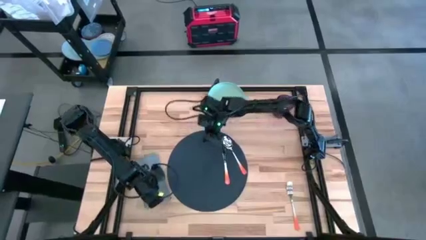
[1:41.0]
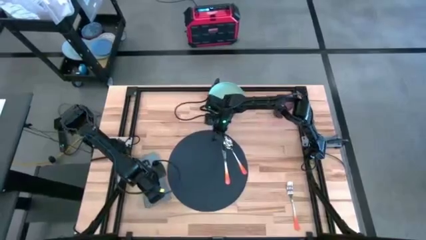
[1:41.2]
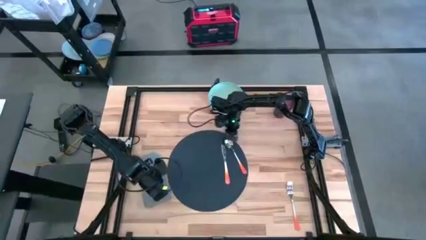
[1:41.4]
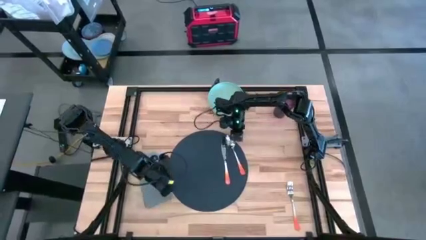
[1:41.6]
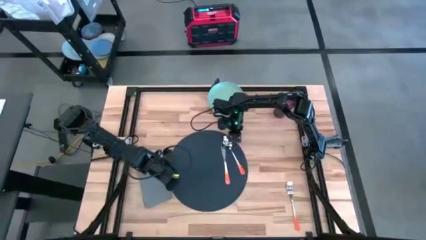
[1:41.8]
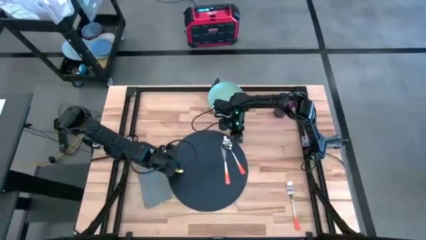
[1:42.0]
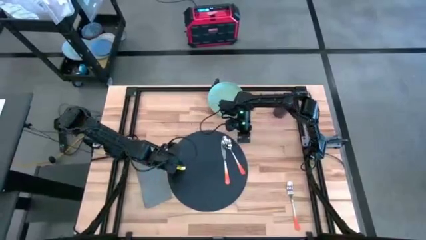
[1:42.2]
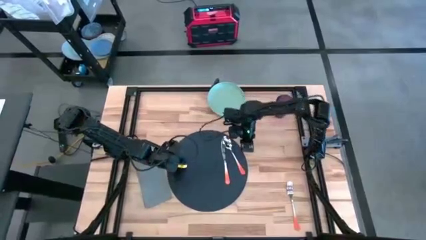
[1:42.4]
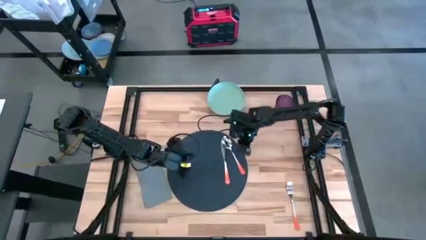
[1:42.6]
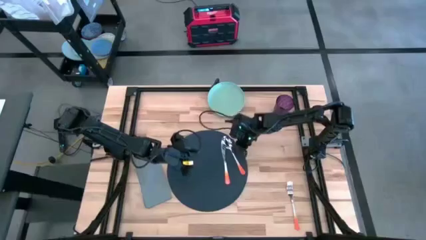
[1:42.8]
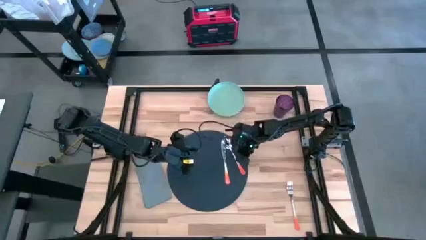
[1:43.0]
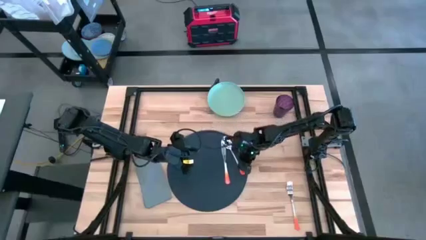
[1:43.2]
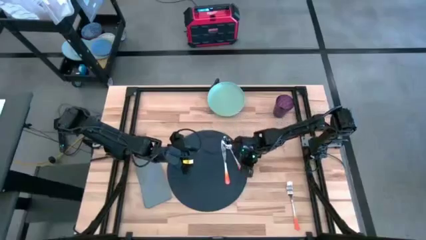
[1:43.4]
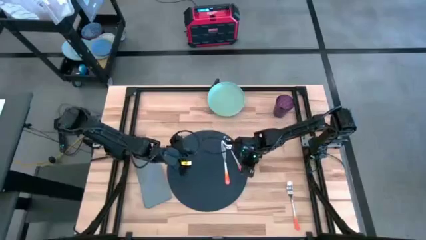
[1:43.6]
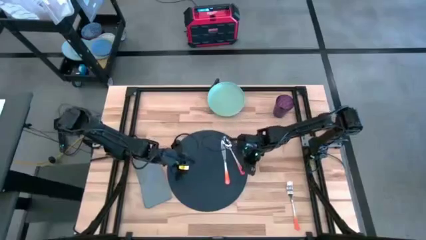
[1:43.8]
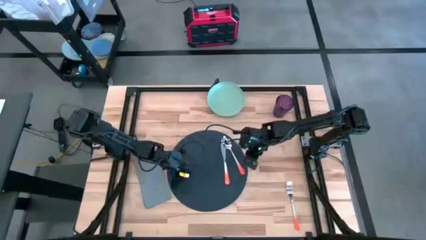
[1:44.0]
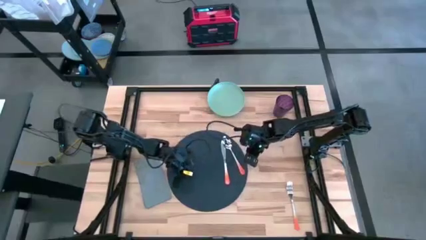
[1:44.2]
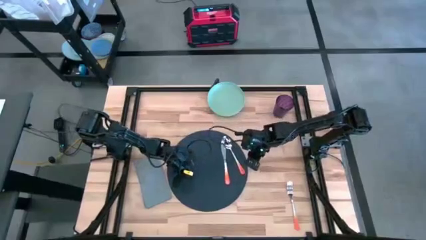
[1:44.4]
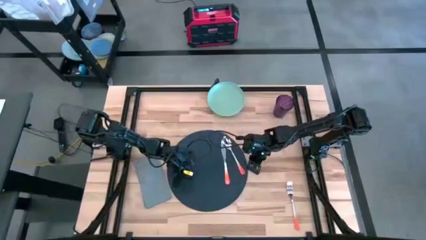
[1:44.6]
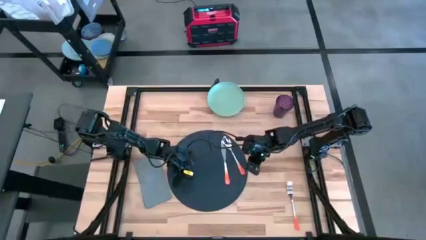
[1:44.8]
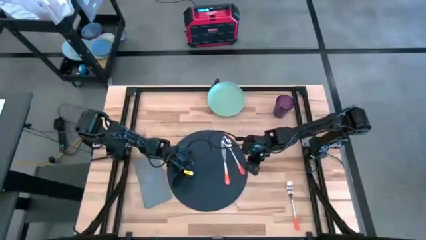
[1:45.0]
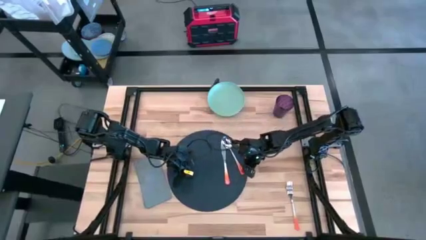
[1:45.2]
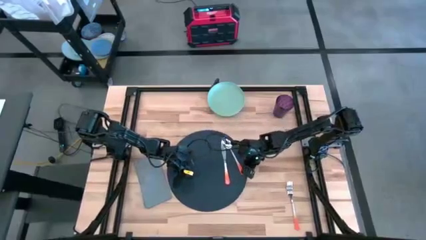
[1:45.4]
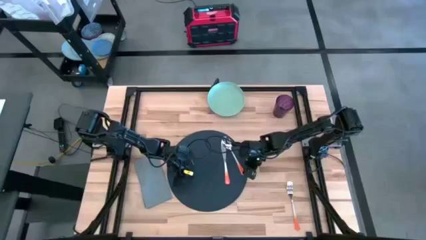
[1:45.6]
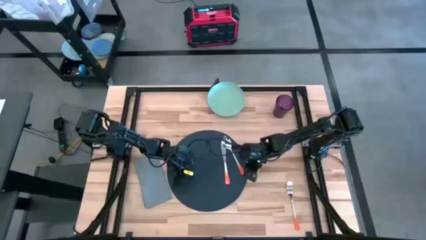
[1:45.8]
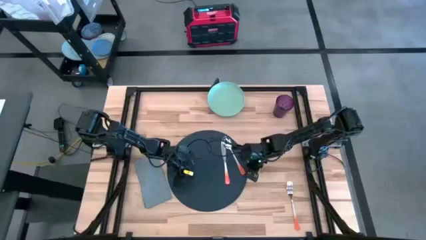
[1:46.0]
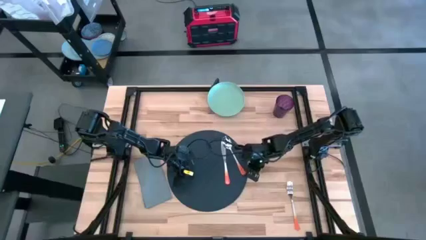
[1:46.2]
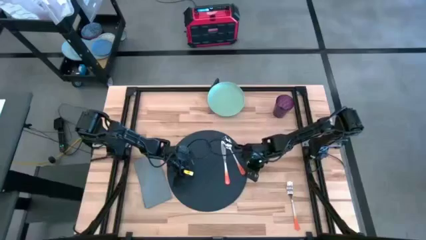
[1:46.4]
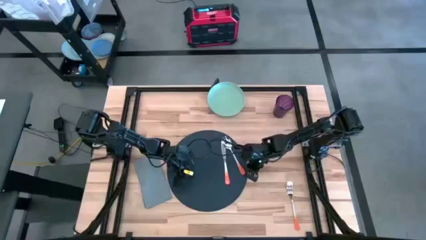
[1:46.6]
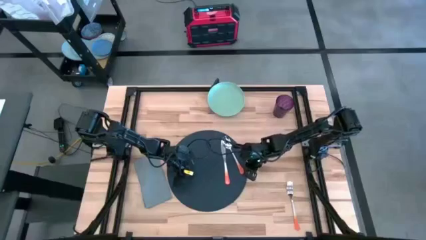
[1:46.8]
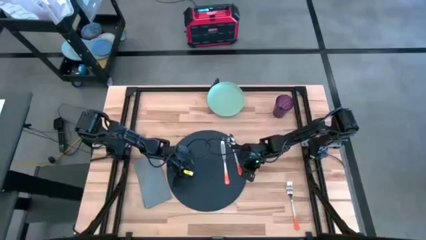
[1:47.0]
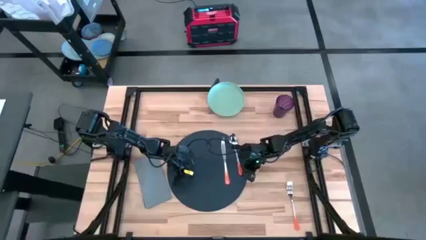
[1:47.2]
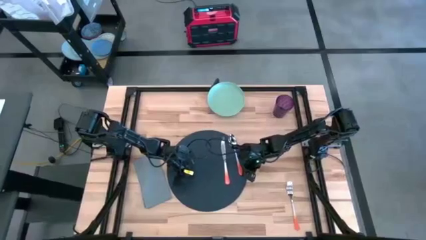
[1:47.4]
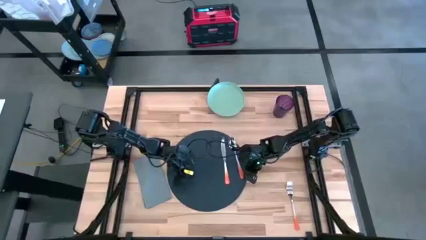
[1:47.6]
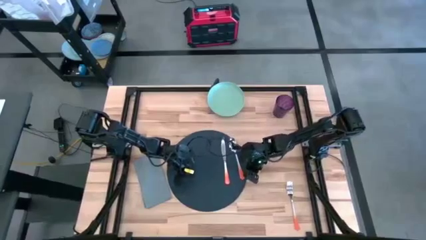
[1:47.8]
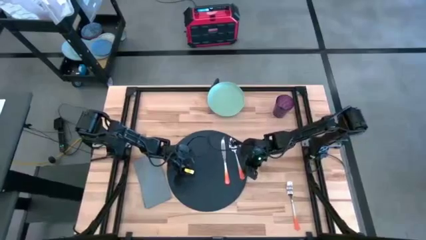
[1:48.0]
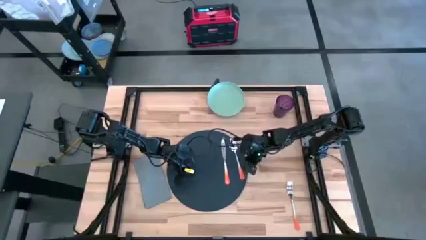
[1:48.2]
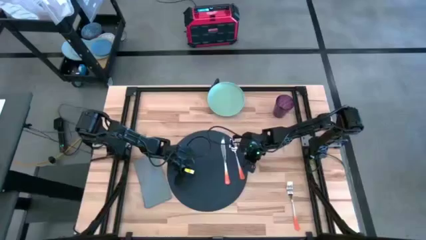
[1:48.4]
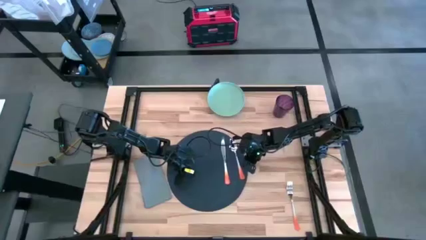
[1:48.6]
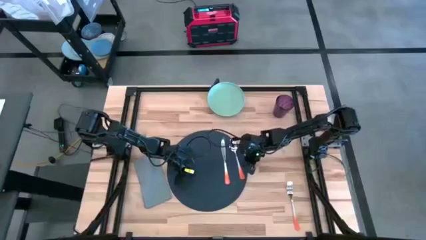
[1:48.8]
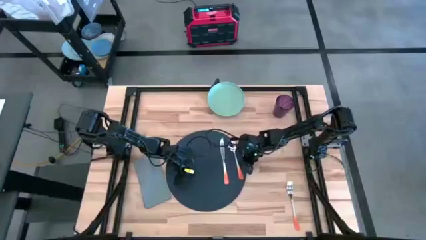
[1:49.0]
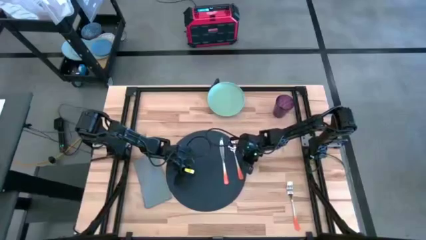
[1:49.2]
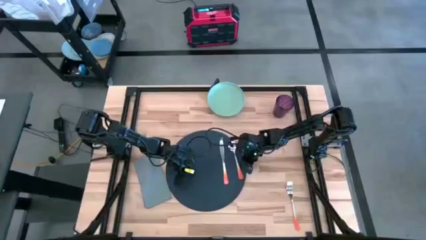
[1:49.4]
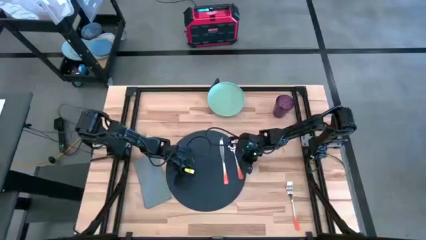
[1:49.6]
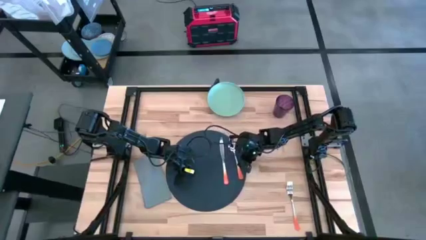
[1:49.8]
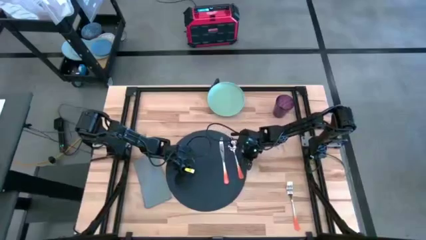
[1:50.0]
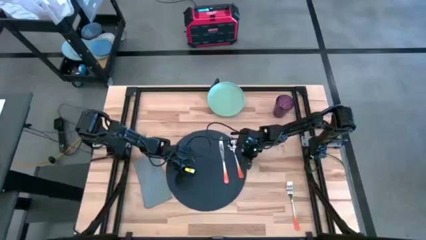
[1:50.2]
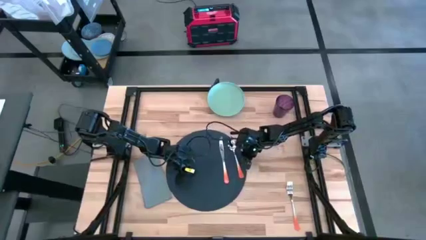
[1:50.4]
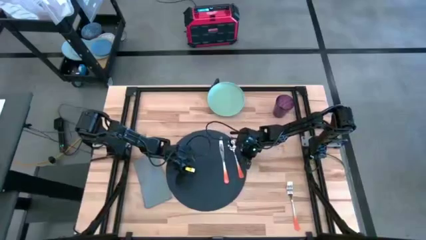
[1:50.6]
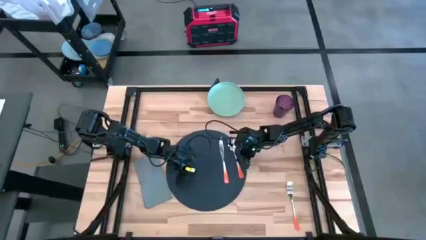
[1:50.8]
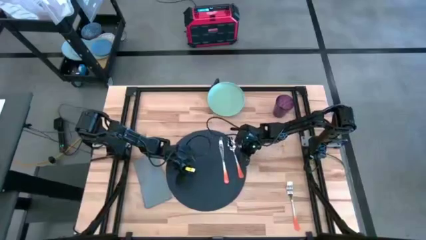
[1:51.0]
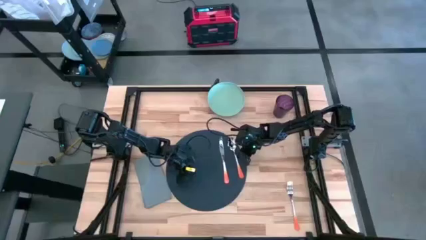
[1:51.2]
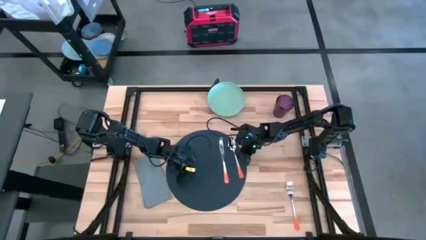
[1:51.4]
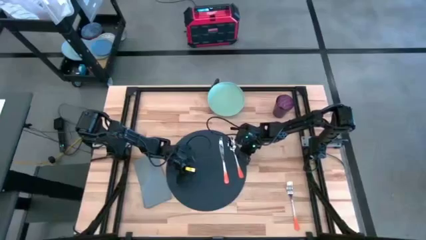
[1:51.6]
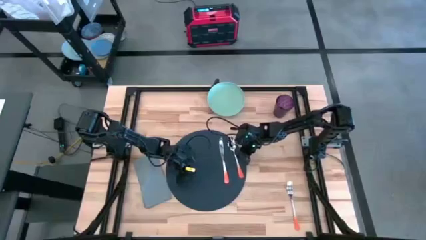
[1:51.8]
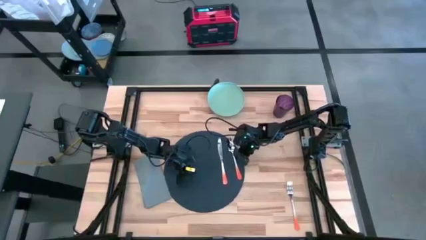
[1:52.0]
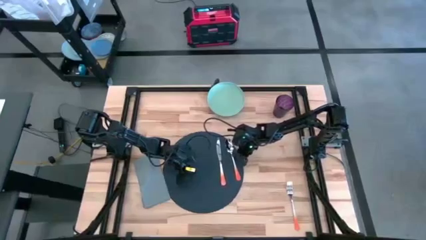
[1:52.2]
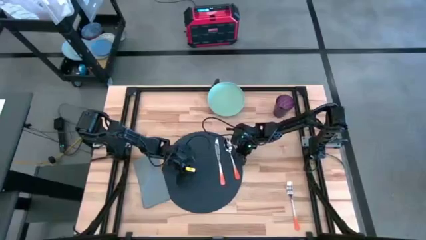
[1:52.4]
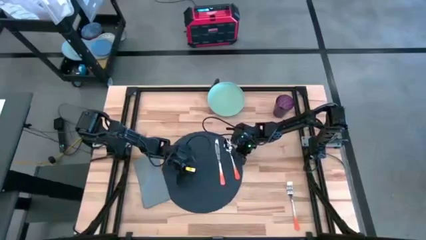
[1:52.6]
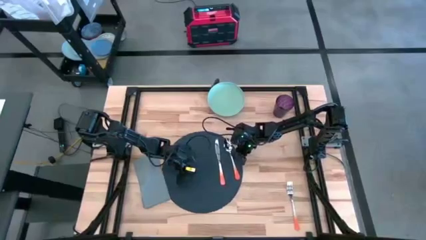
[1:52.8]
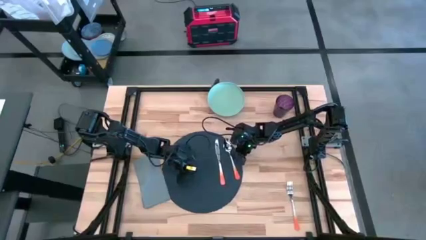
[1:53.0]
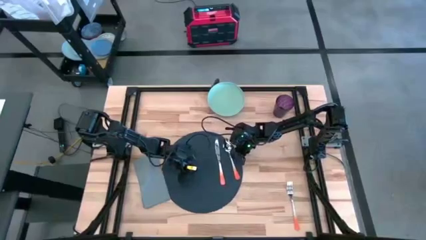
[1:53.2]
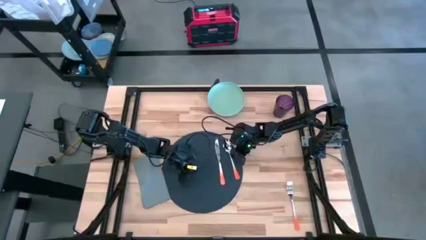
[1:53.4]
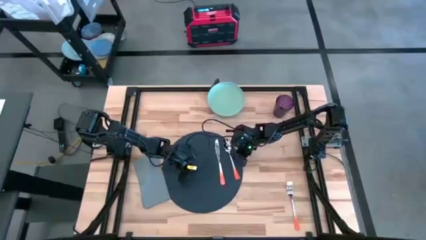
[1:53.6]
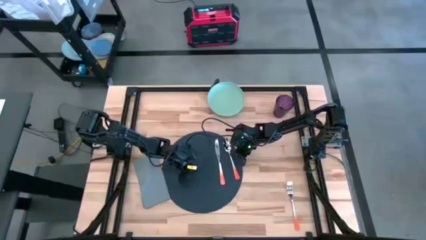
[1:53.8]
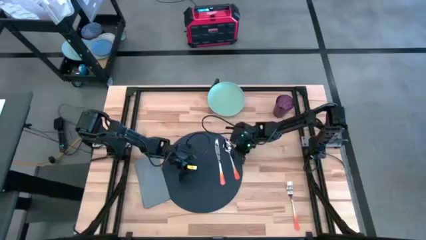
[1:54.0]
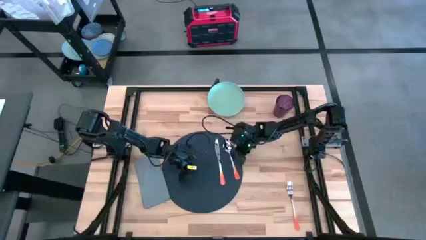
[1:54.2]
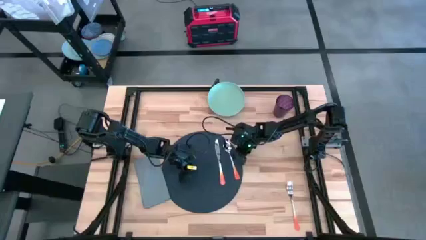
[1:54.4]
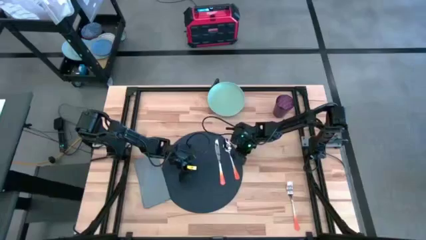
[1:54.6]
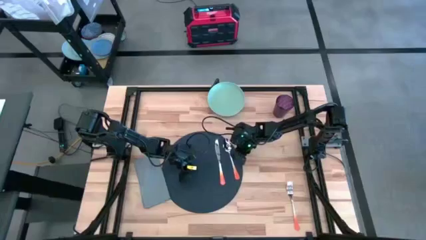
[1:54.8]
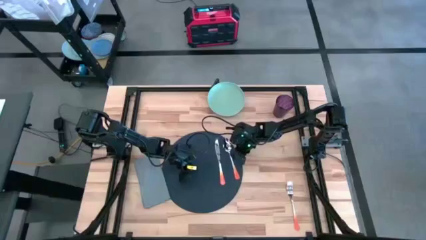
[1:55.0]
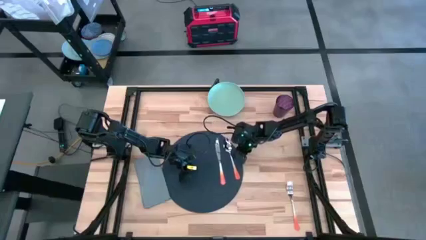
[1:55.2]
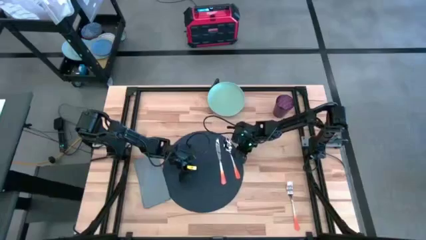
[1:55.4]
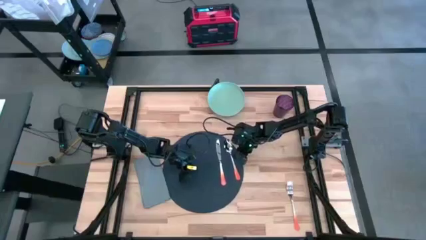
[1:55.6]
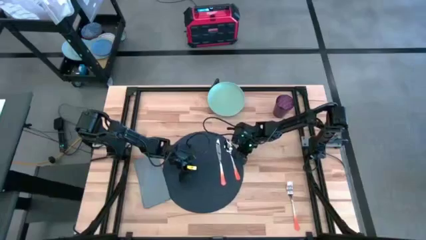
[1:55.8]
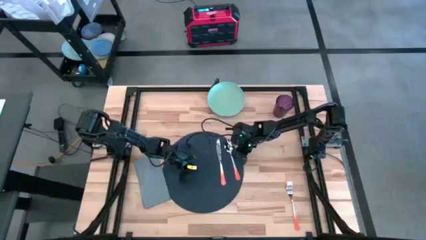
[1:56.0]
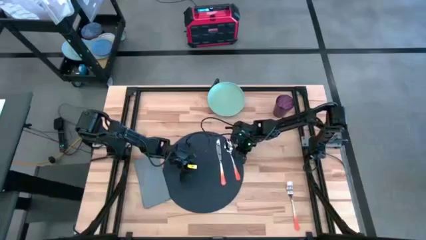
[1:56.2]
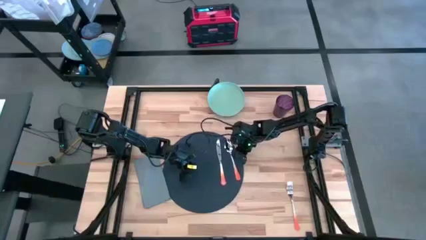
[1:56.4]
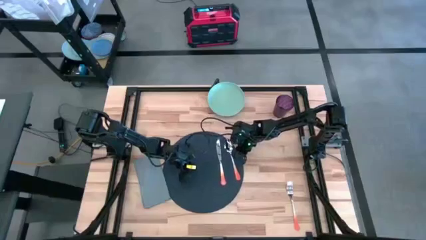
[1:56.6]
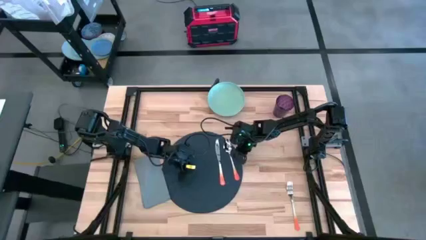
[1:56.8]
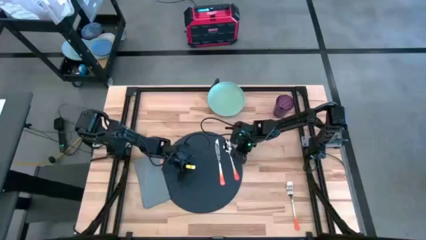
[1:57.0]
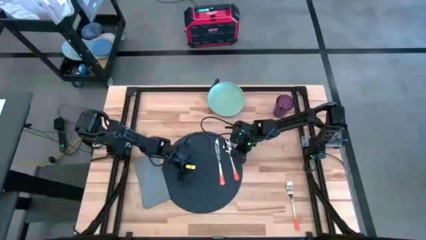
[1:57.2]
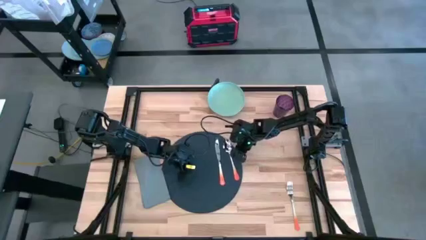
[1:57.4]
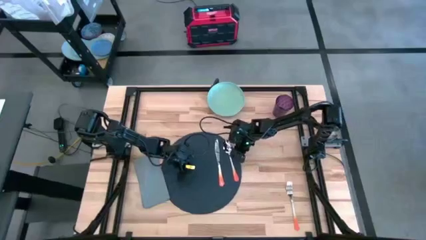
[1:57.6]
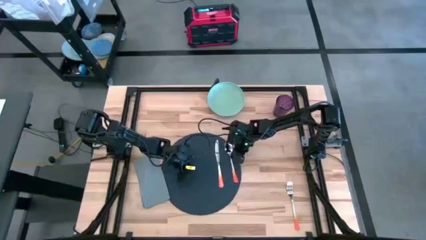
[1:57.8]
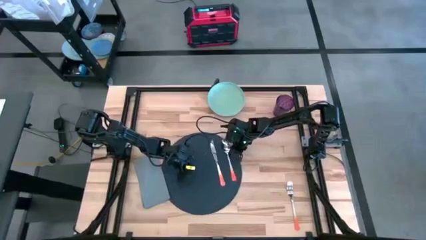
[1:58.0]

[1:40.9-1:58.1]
Task: Set table place
Adjust the orange spoon on the dark gray placemat
